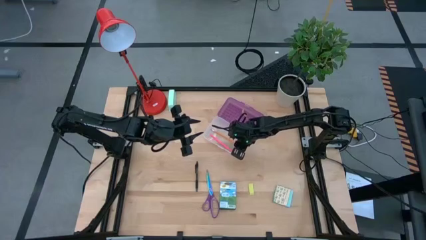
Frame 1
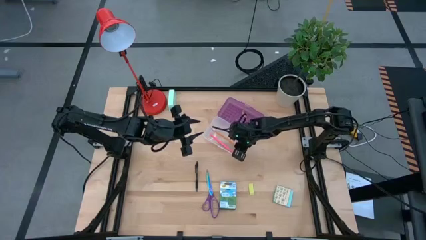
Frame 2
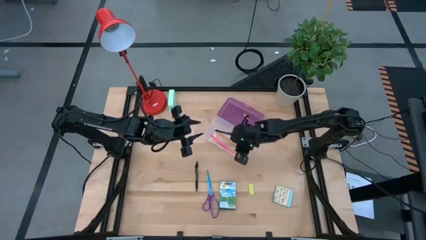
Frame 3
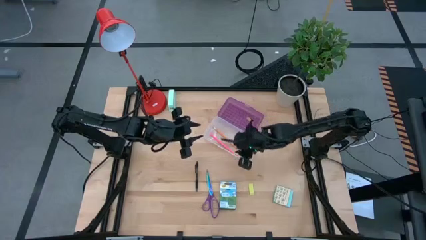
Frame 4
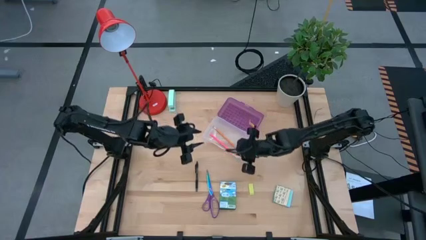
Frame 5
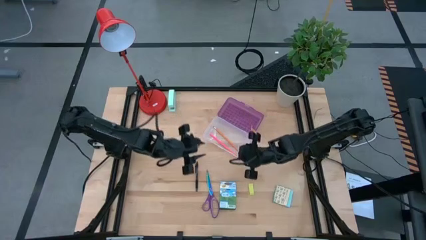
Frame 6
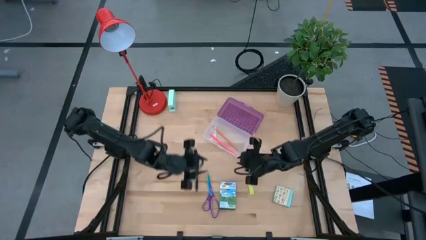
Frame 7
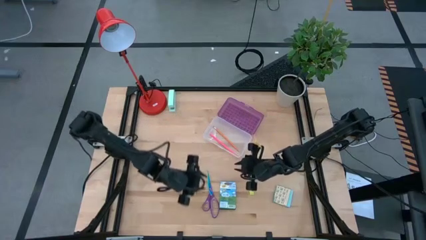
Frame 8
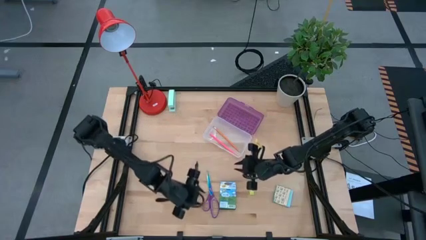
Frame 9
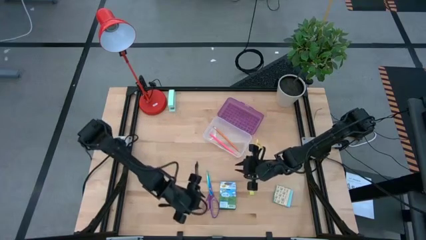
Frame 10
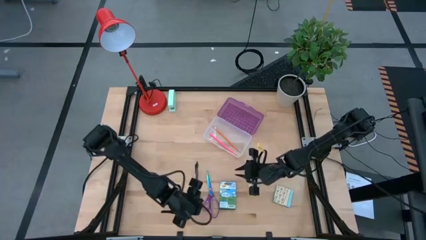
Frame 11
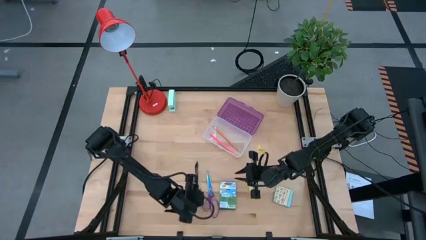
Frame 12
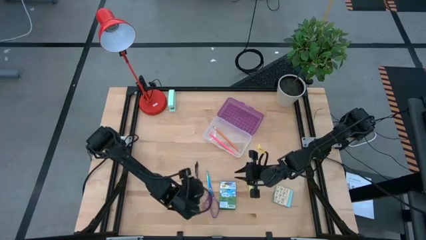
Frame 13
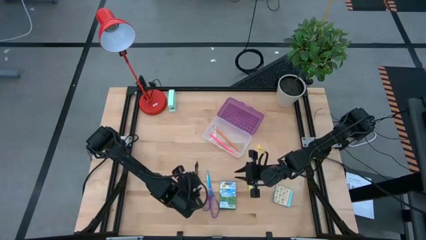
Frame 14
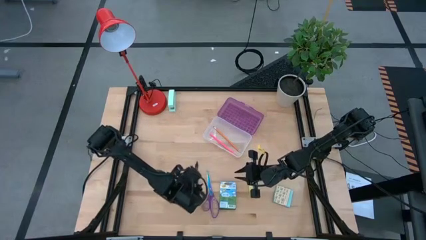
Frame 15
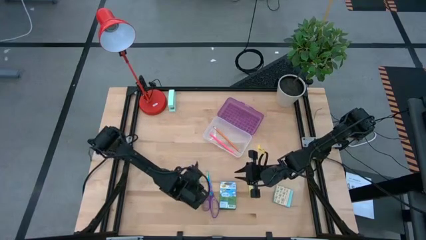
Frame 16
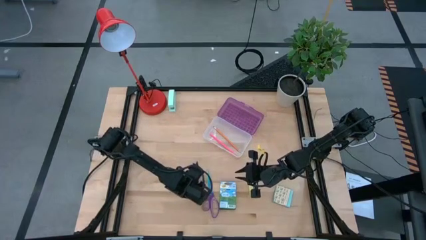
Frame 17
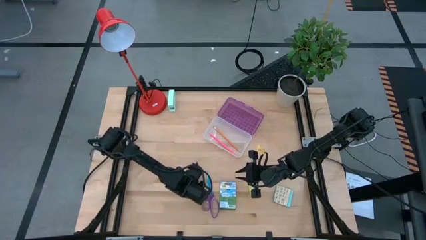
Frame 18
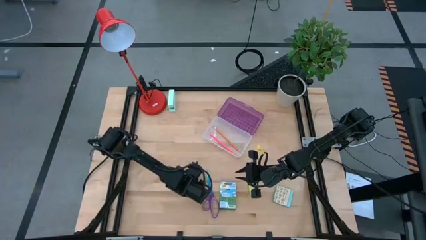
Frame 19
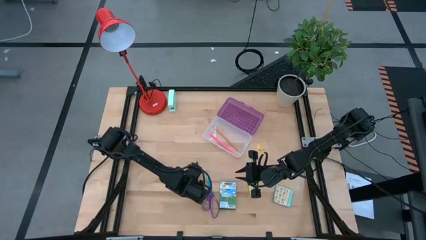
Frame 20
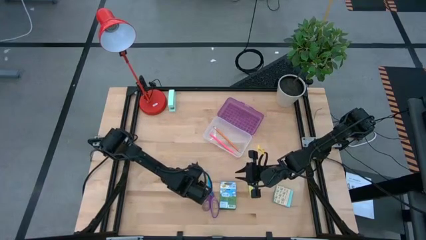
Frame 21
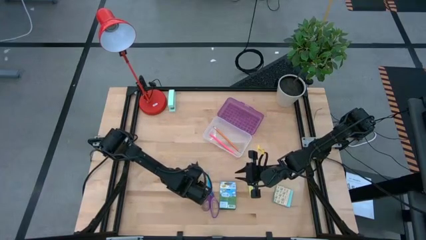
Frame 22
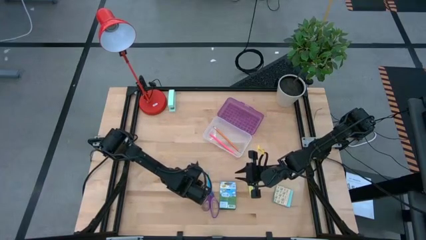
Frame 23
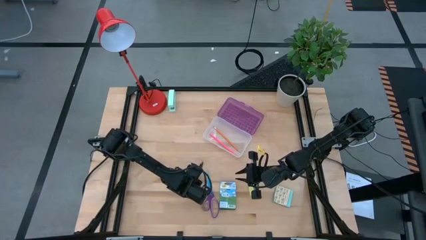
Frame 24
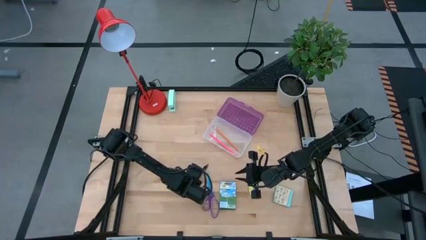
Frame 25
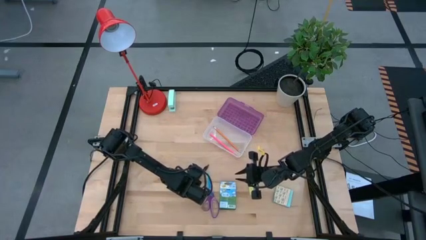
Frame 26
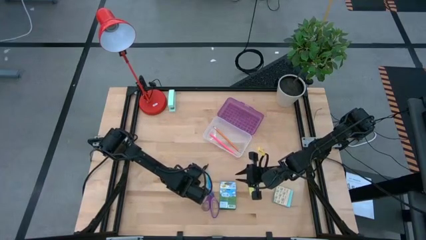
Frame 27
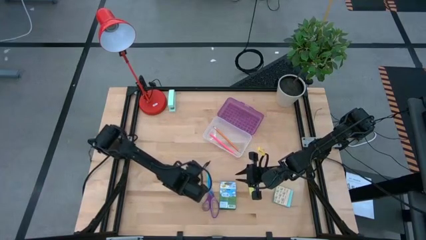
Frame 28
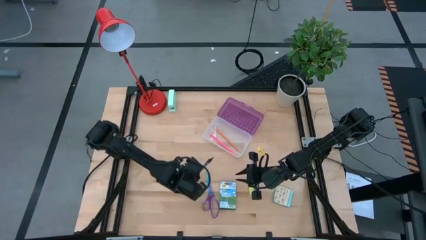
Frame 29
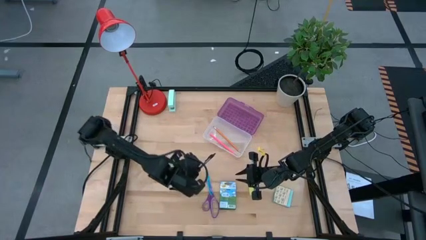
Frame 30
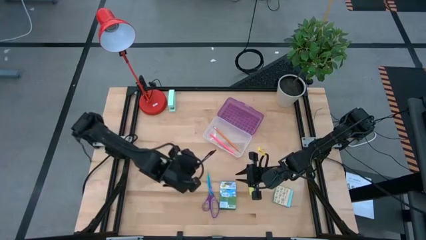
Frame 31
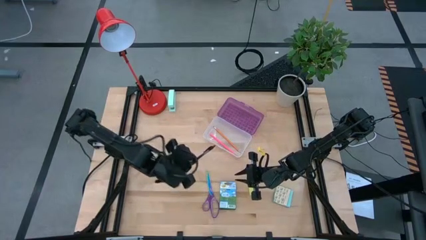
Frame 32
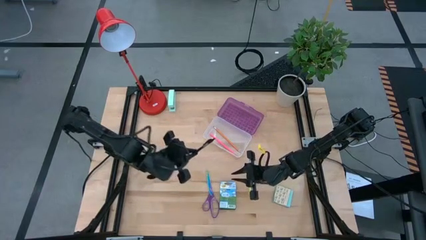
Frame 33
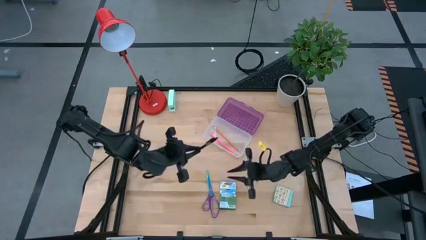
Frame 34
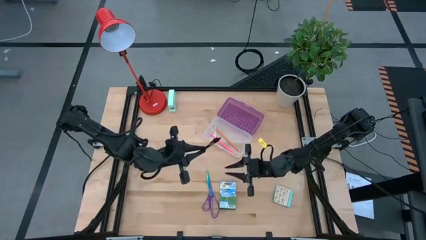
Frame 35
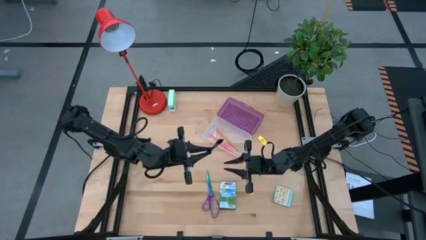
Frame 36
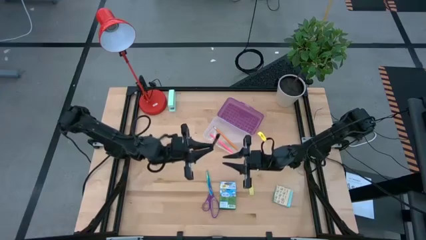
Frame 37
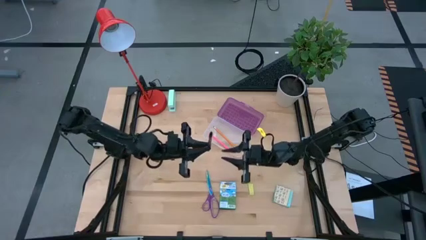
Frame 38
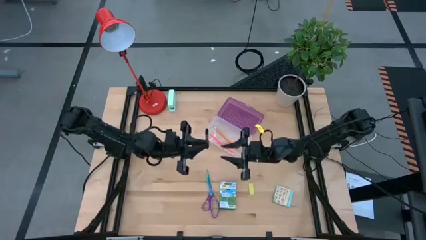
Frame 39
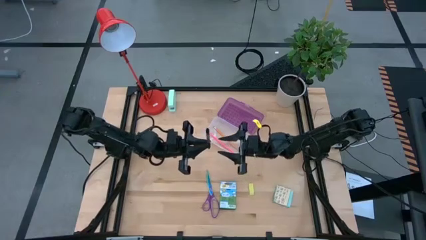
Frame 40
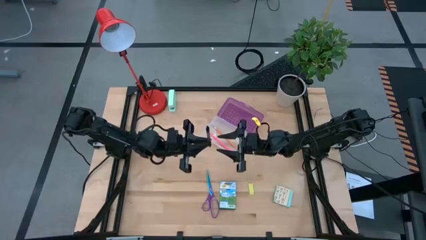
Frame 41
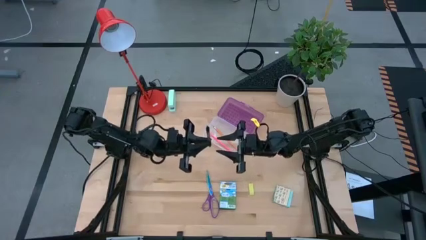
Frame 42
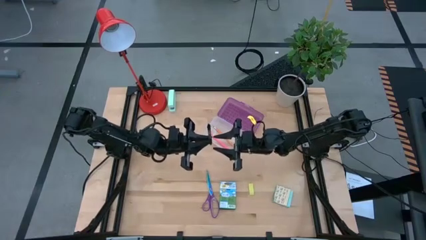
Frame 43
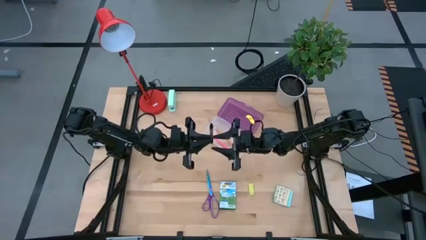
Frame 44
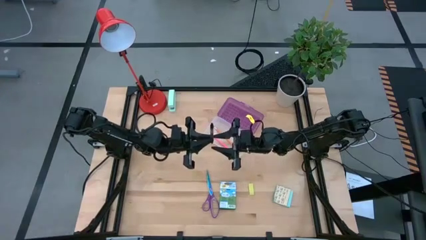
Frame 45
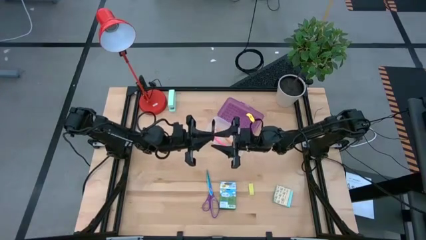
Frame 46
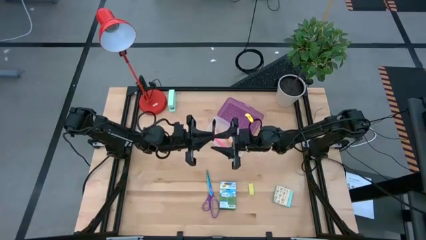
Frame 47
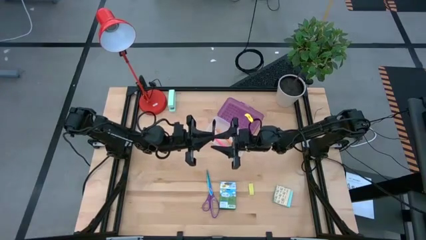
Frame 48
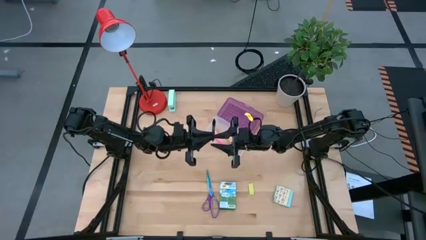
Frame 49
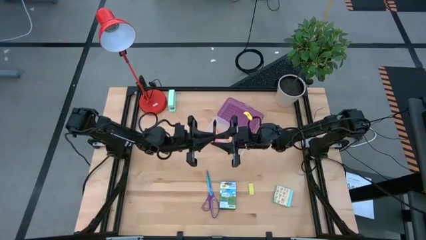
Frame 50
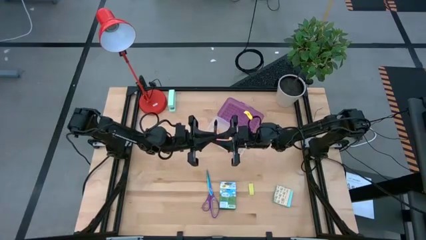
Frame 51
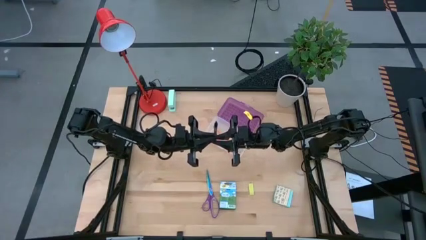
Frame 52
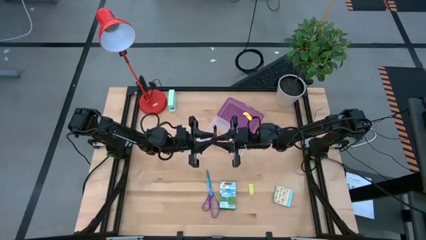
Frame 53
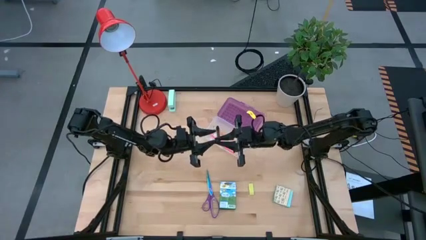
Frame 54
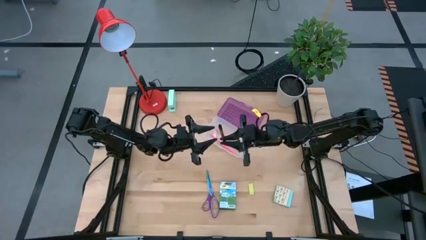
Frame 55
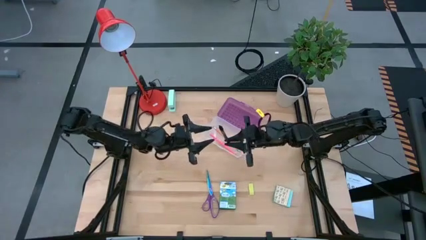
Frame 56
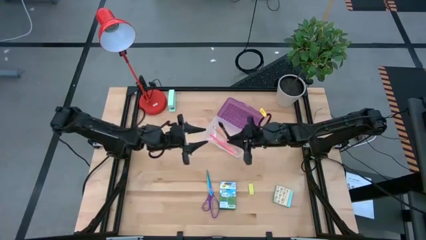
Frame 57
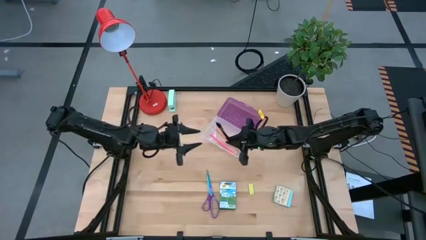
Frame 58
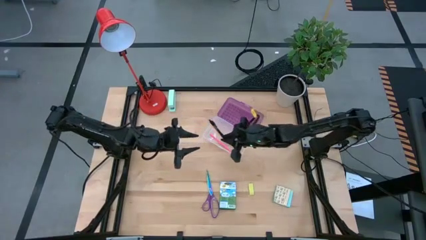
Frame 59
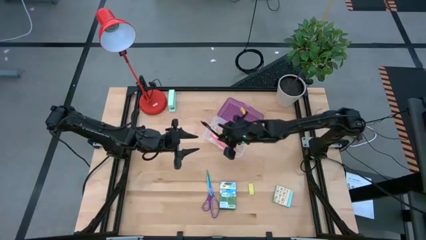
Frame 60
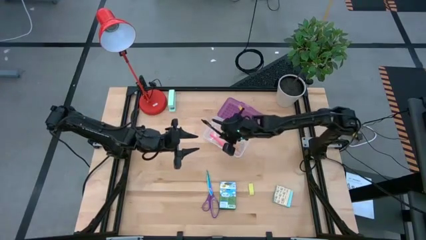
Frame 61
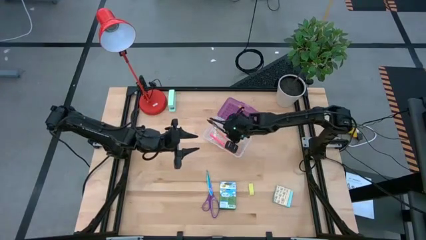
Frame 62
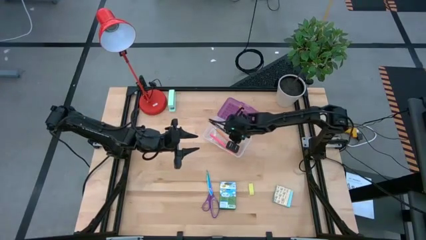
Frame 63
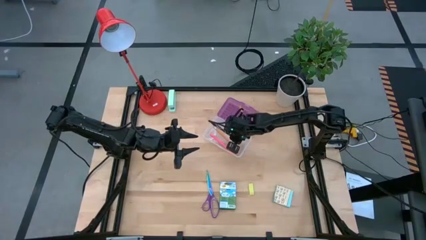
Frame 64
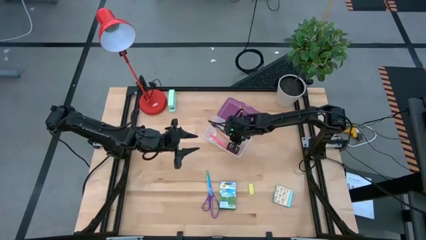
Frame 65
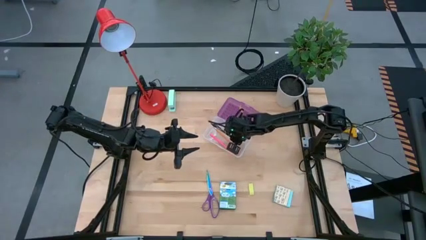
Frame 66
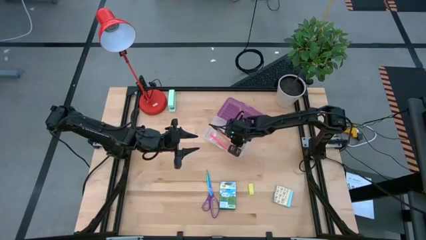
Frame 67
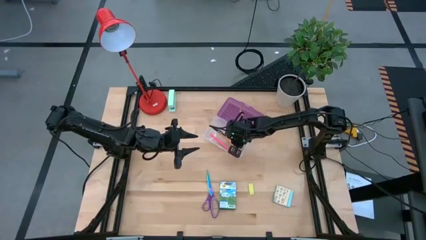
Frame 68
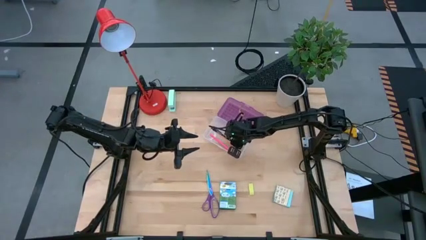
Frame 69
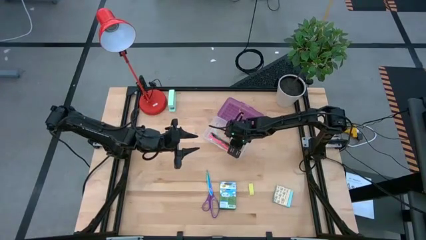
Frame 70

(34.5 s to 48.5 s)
Task: Pack school essentials
Put the black pen into the purple supply box
